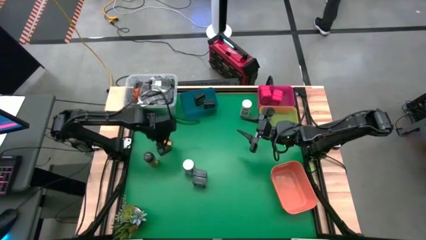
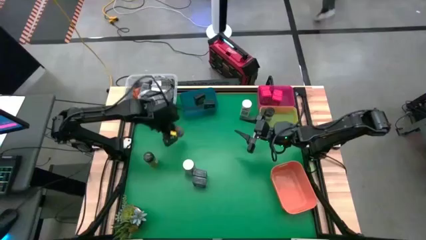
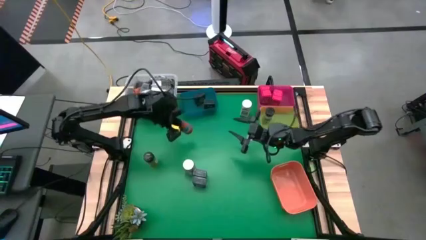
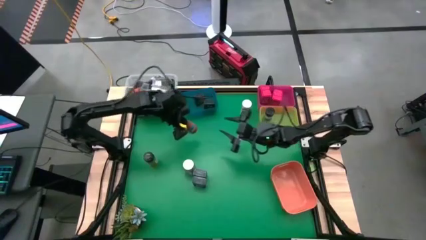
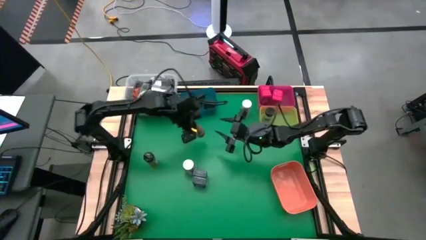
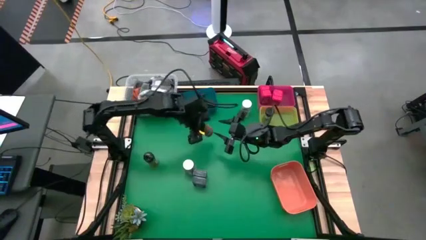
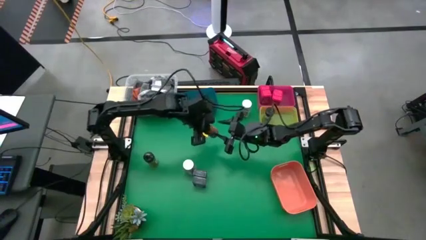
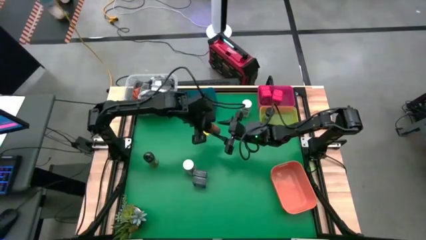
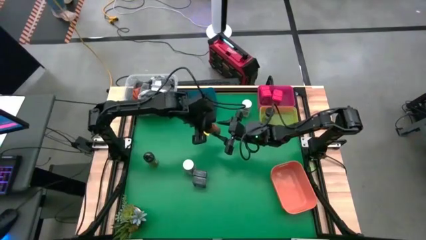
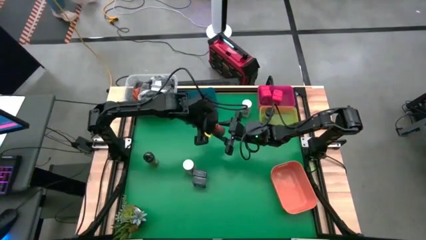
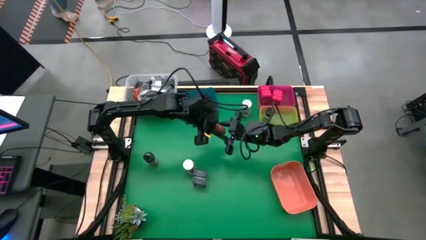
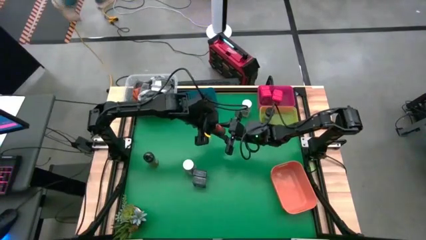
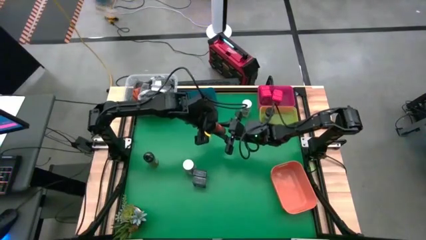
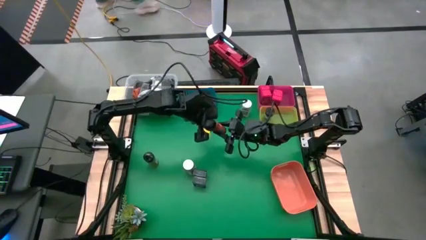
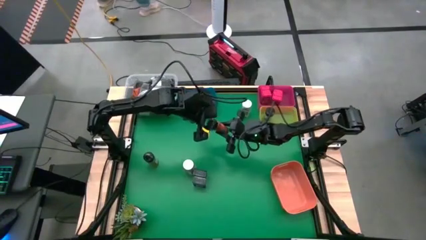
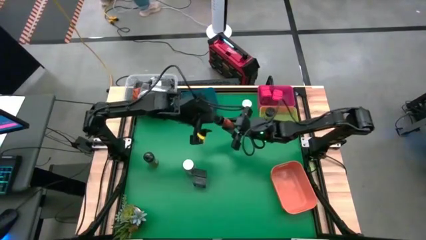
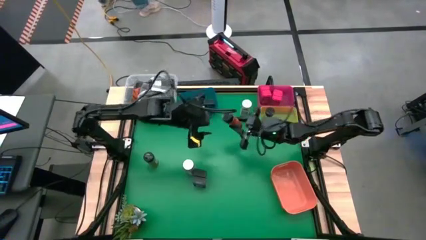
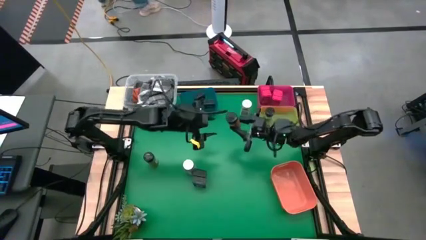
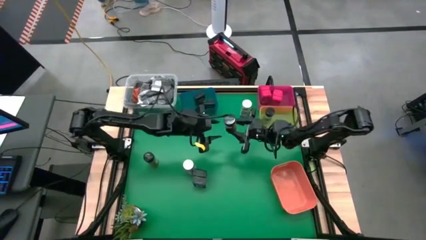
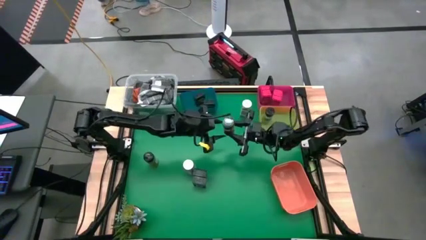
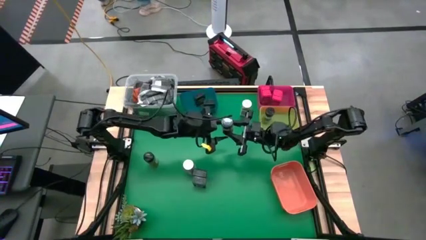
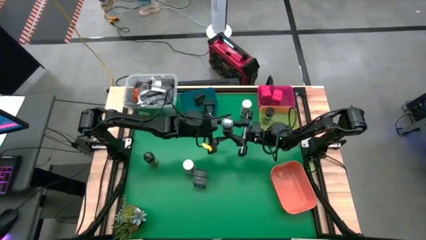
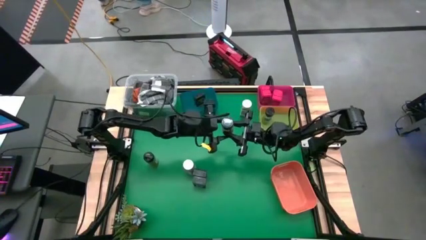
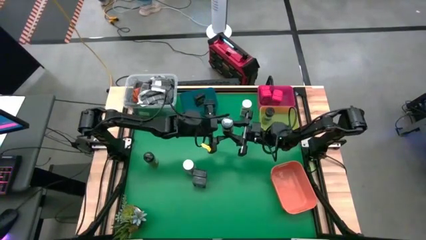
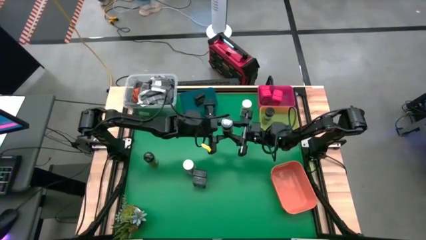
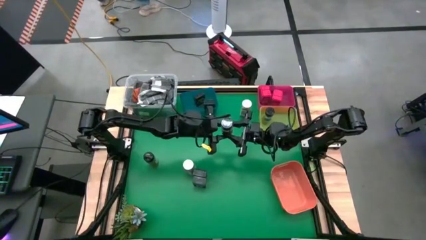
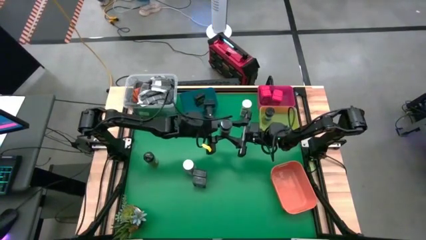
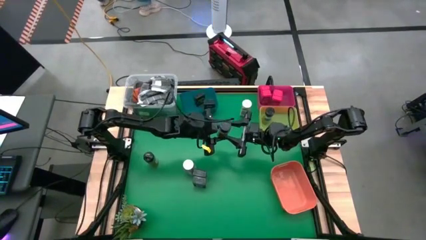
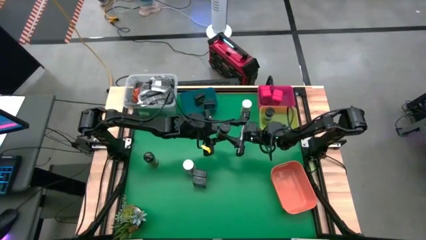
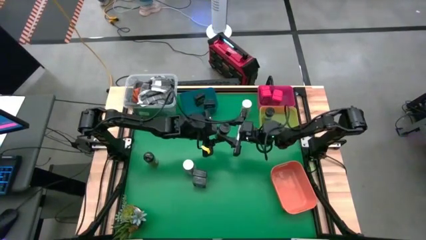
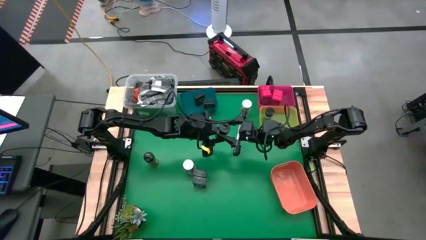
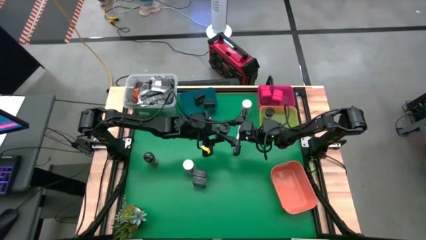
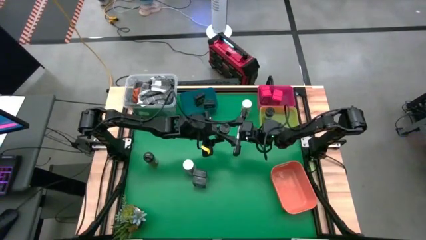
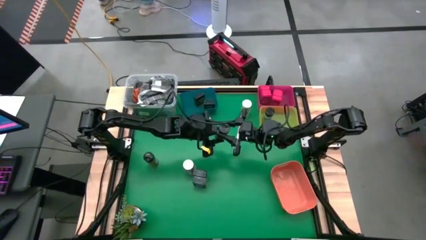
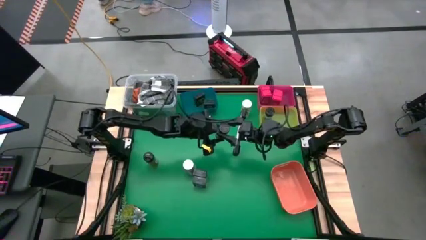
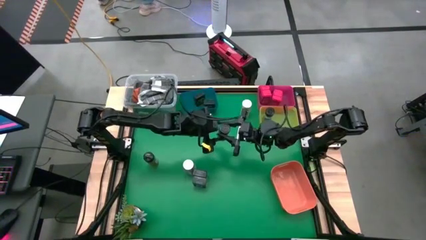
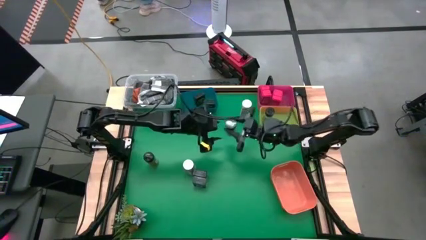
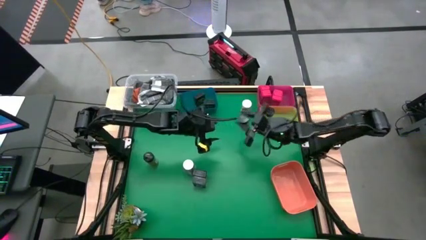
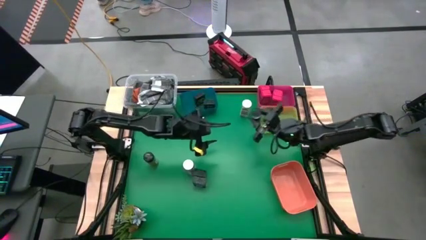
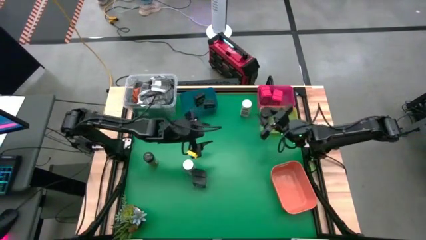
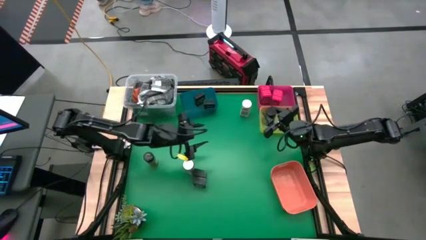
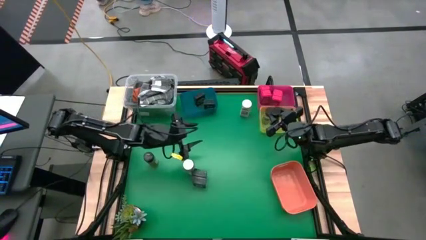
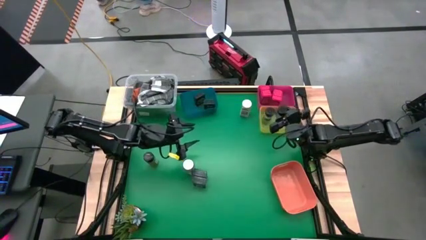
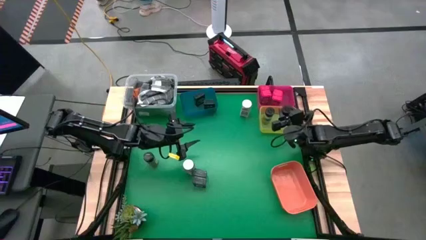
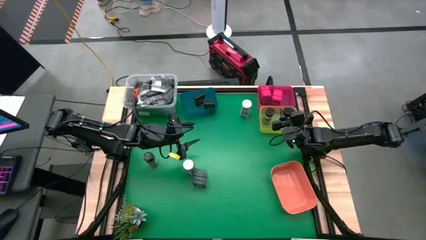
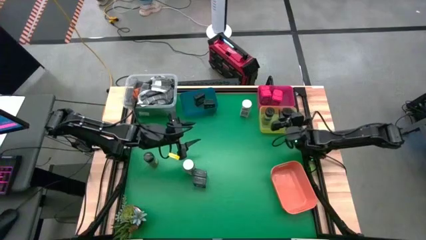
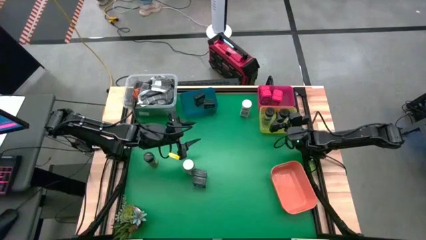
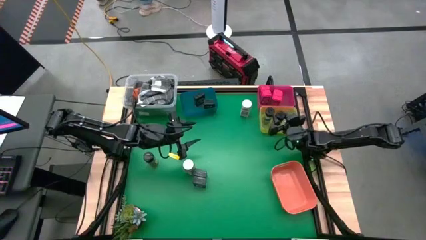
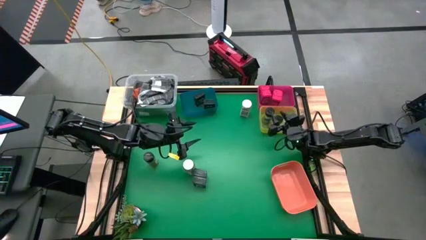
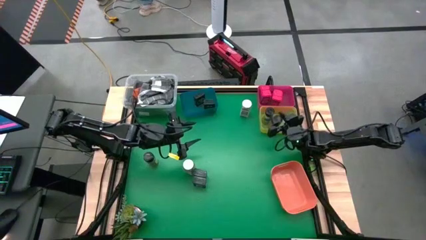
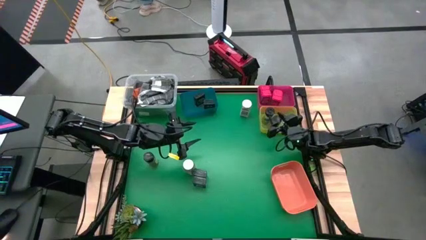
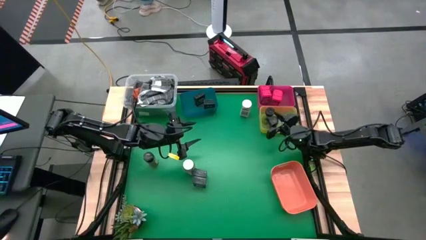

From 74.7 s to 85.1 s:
Task: Sort spices by type
Put the black seasoning from the middle left into the yellow bin

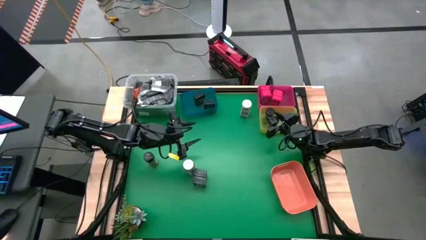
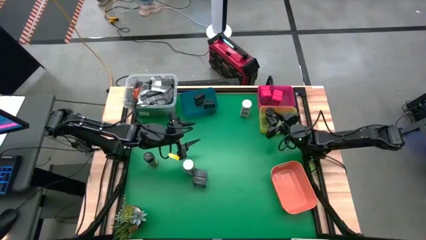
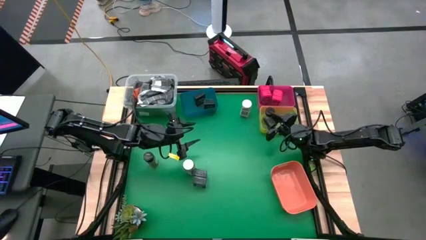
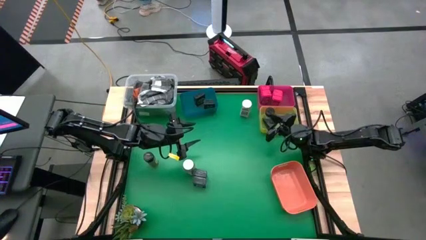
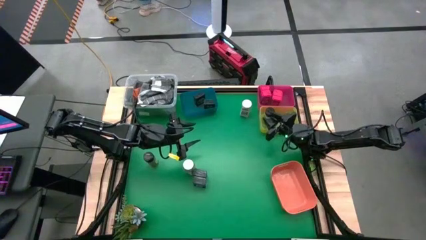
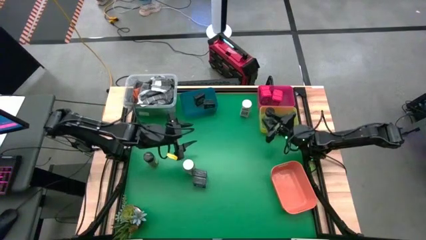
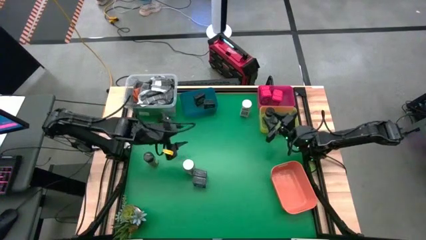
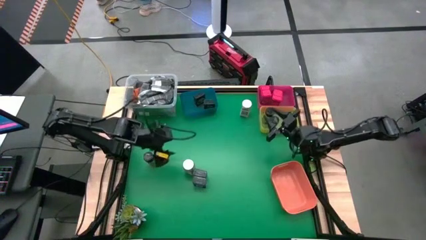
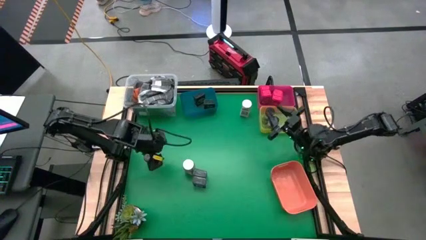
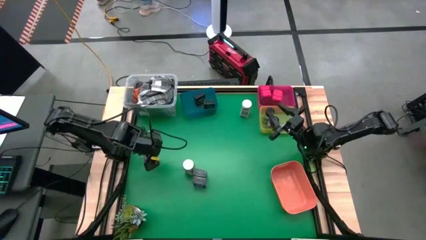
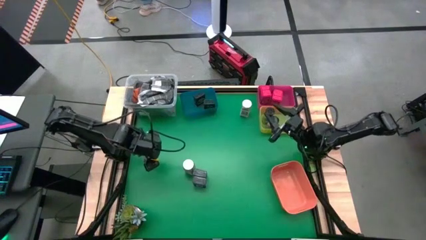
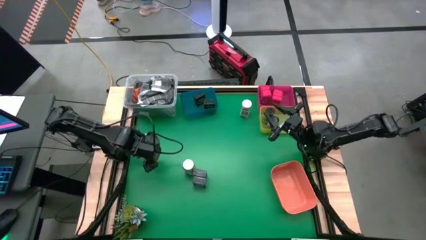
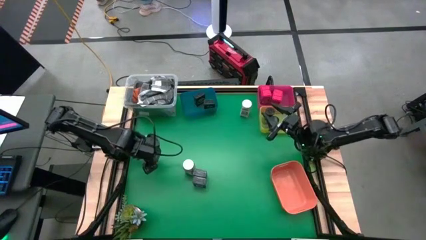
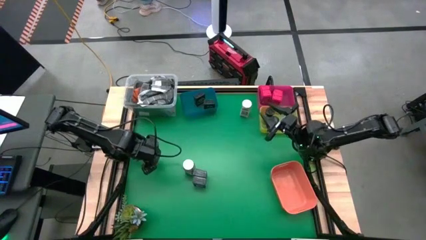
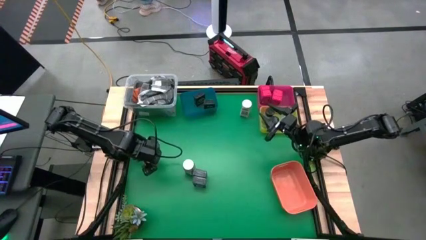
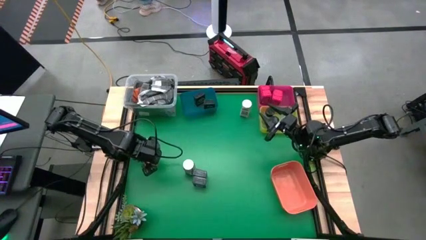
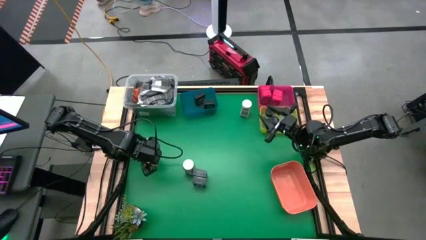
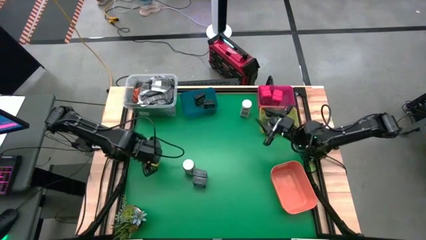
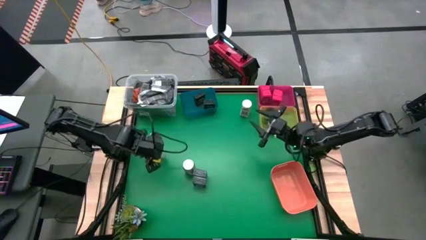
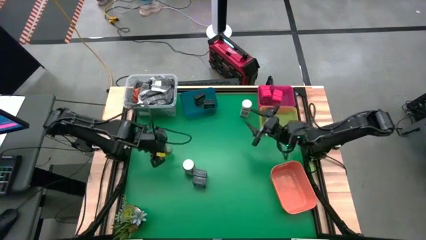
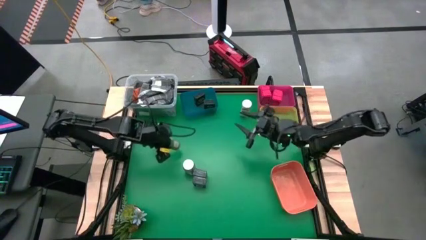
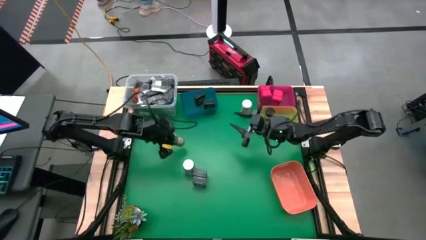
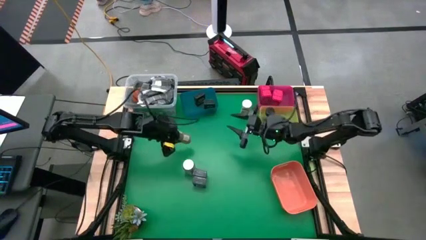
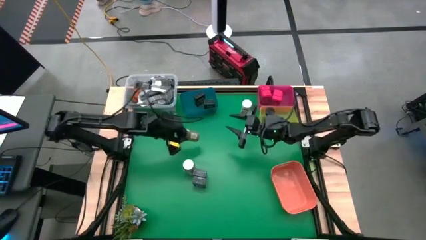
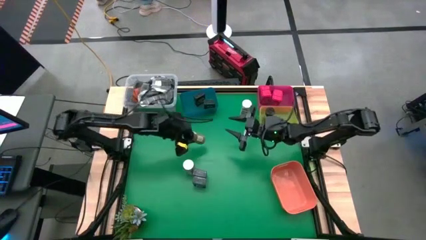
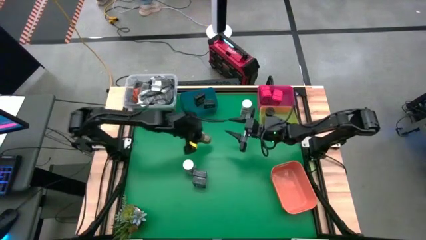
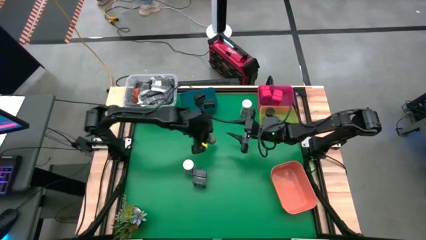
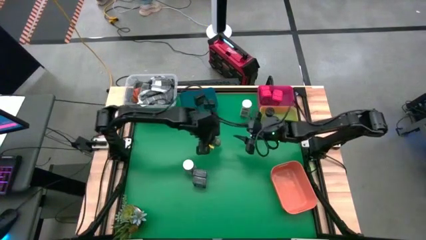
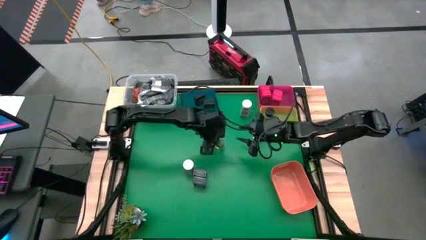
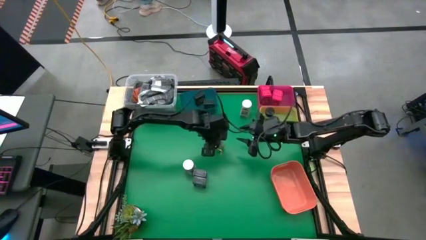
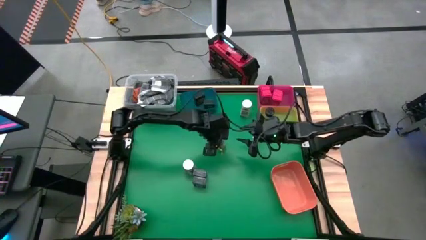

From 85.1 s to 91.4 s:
Put the black seasoning from the middle left into the yellow bin
